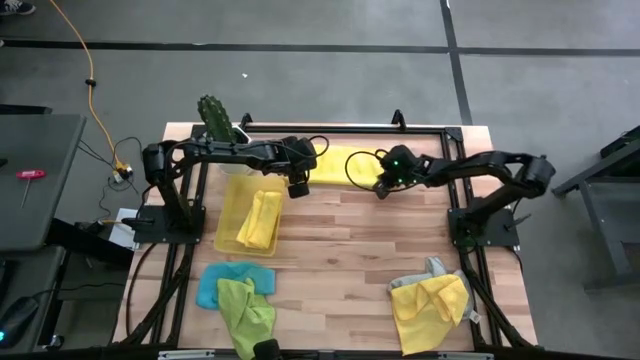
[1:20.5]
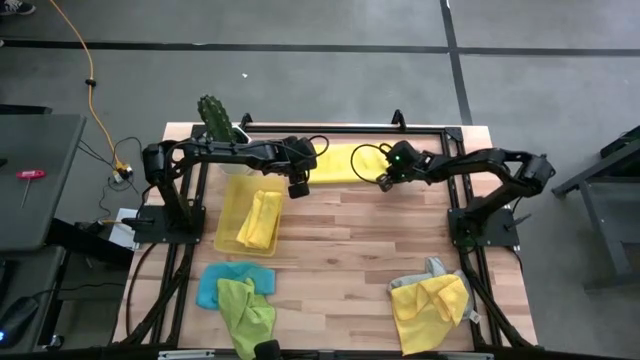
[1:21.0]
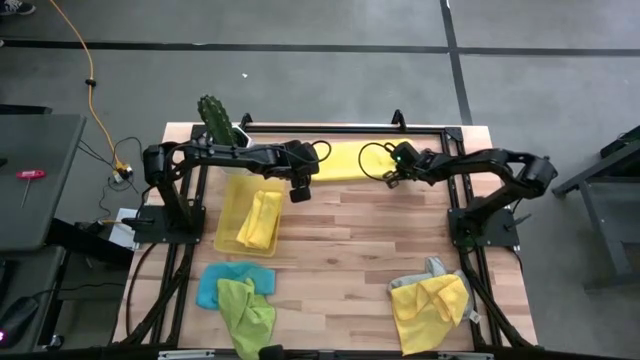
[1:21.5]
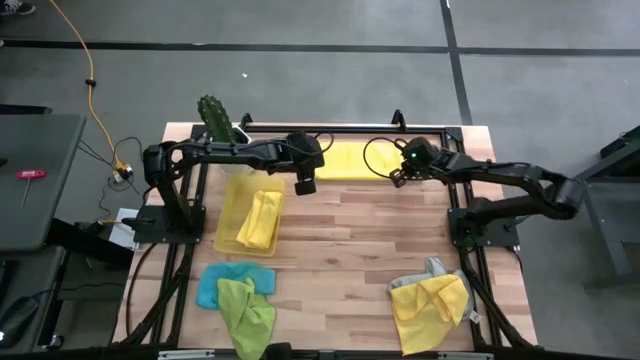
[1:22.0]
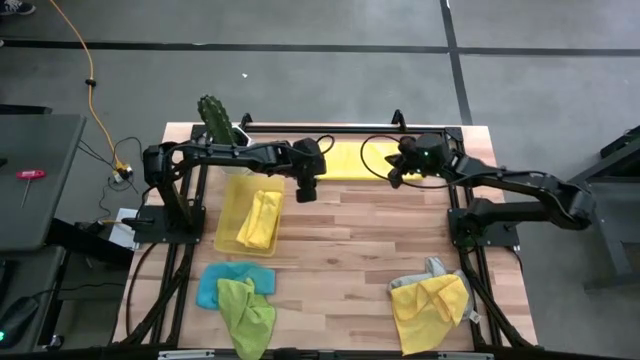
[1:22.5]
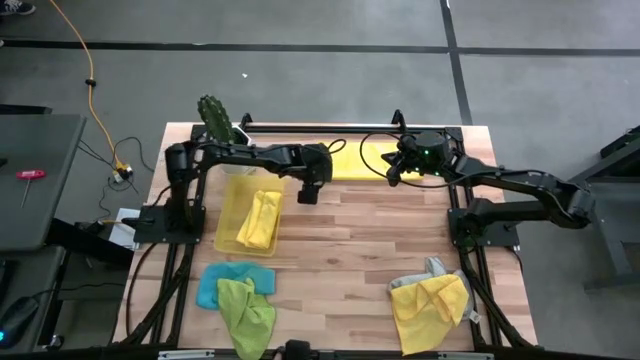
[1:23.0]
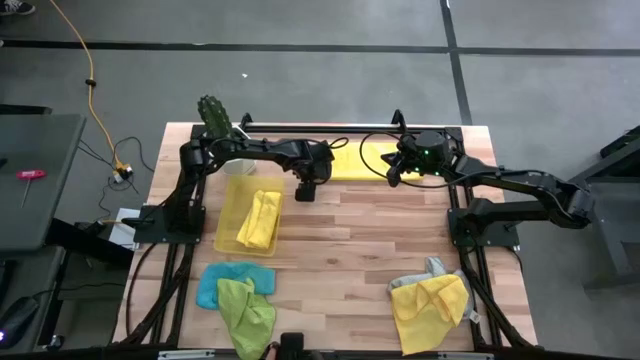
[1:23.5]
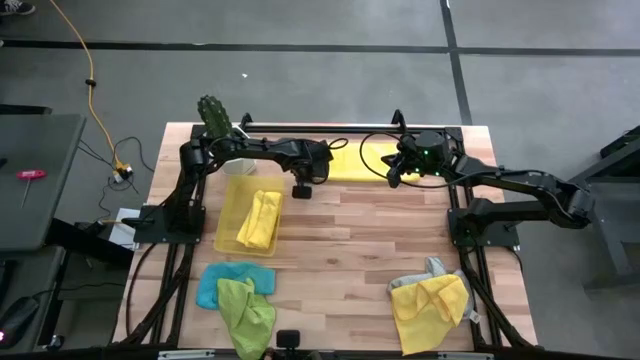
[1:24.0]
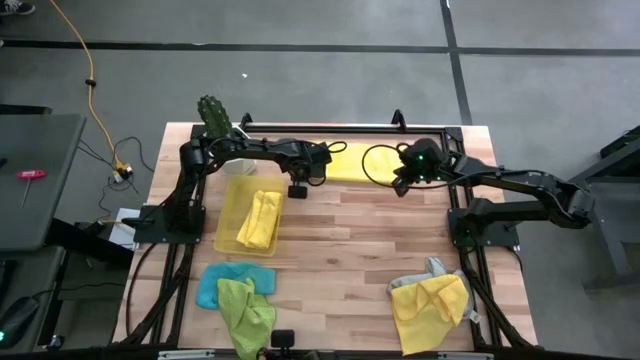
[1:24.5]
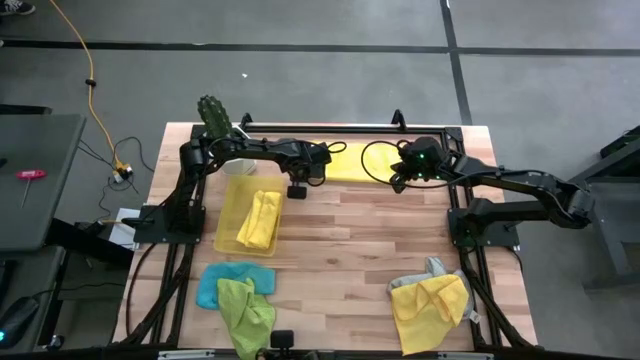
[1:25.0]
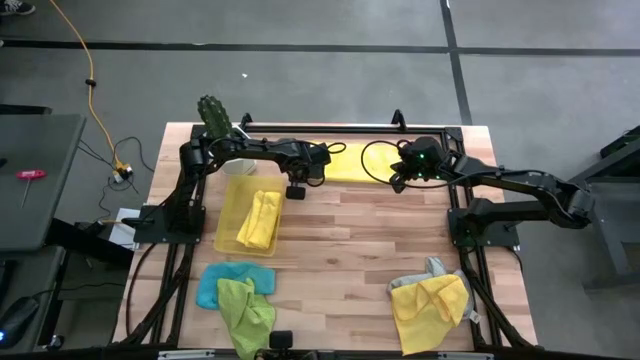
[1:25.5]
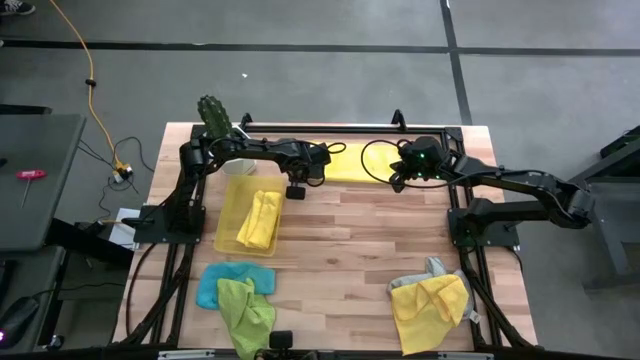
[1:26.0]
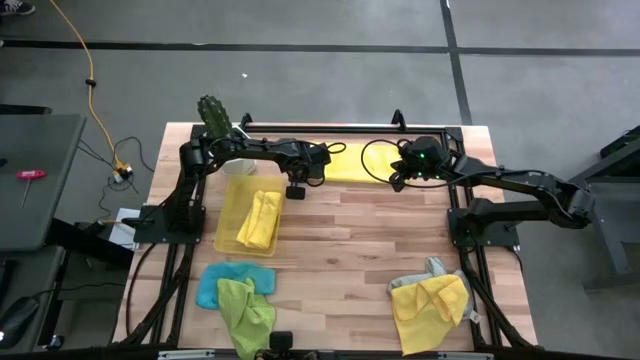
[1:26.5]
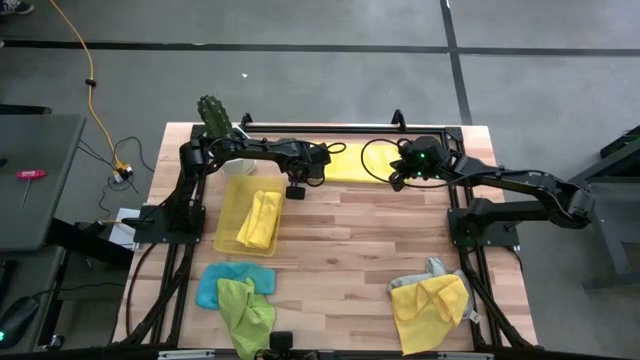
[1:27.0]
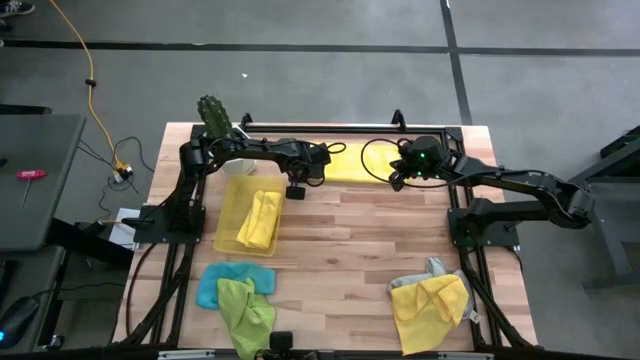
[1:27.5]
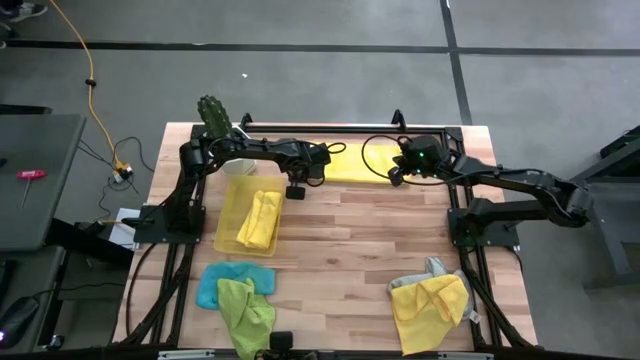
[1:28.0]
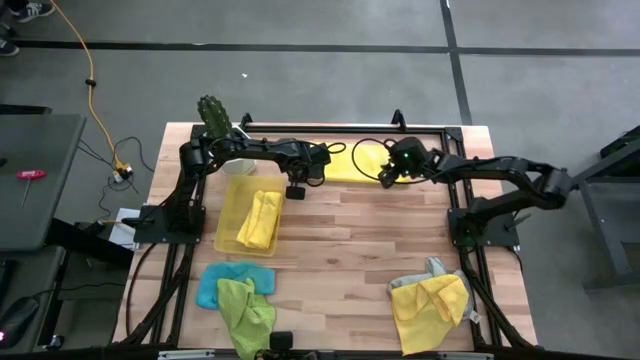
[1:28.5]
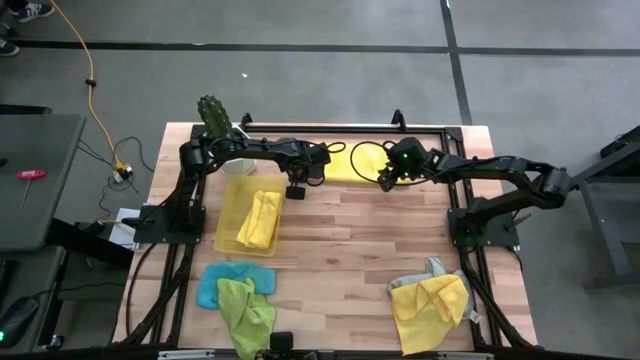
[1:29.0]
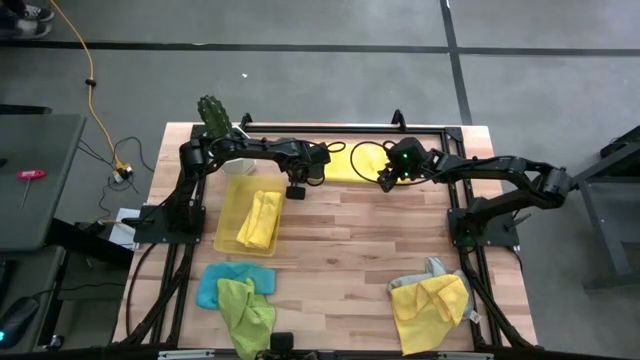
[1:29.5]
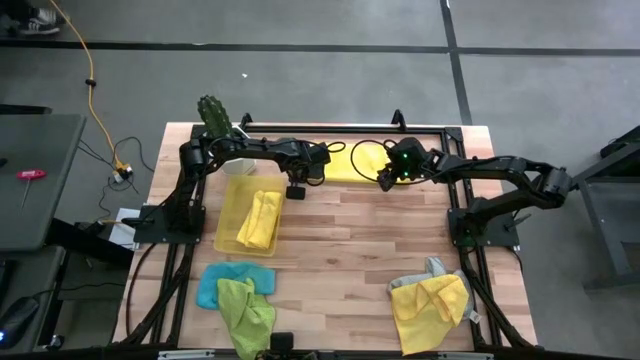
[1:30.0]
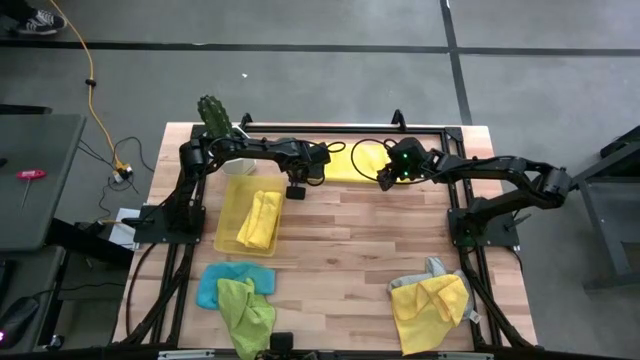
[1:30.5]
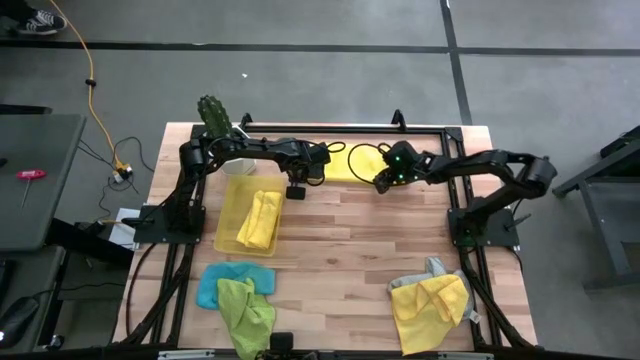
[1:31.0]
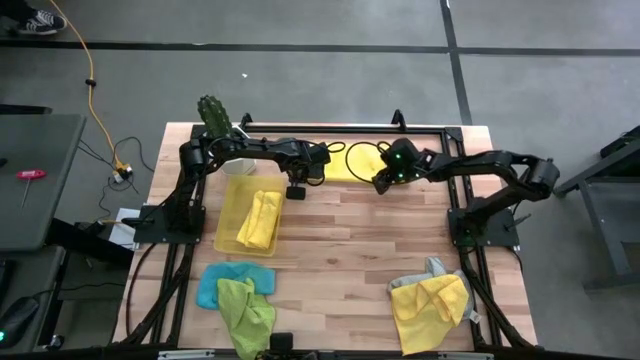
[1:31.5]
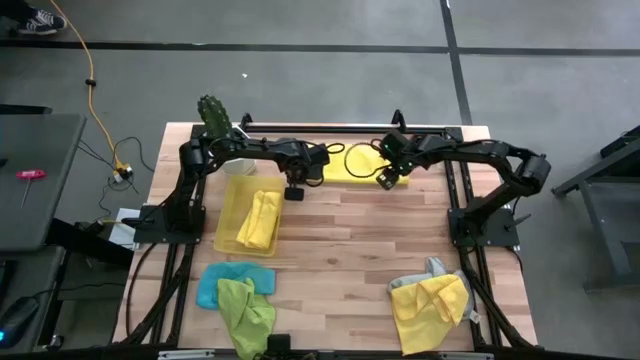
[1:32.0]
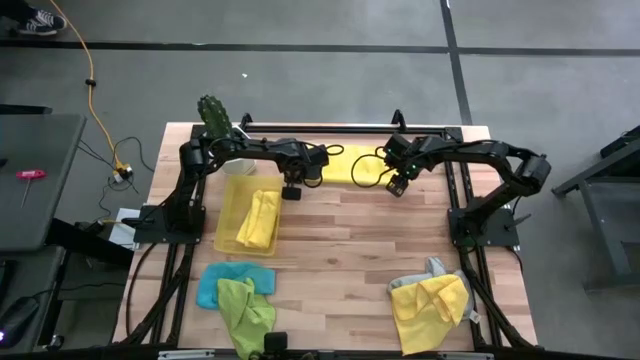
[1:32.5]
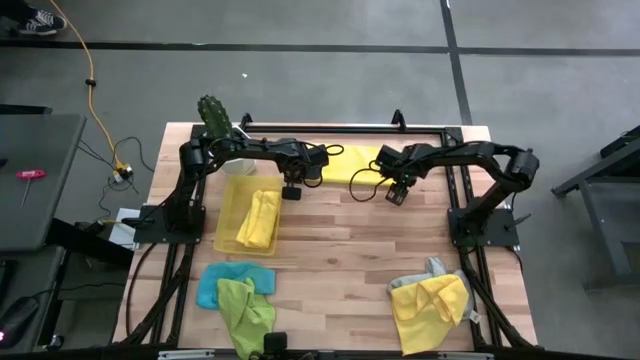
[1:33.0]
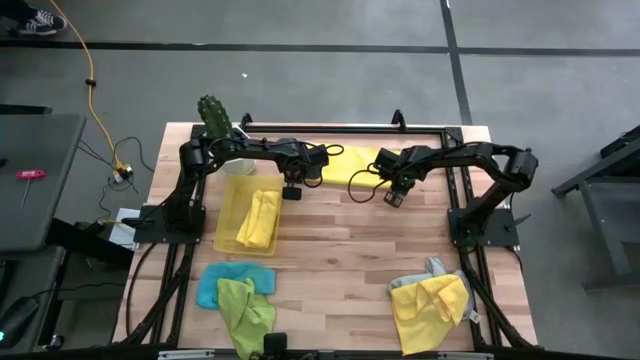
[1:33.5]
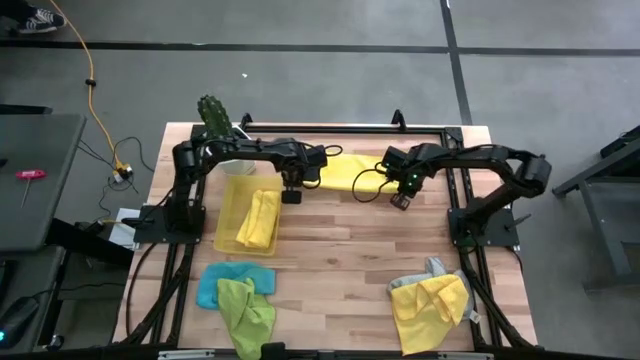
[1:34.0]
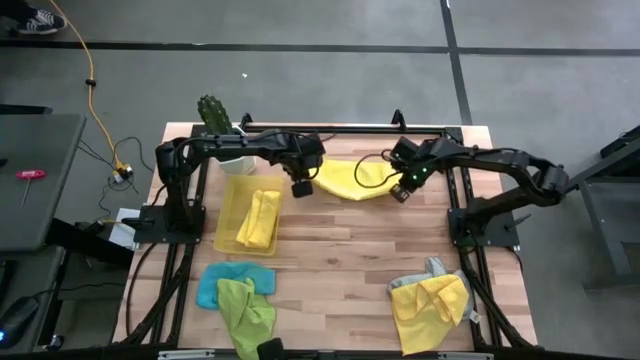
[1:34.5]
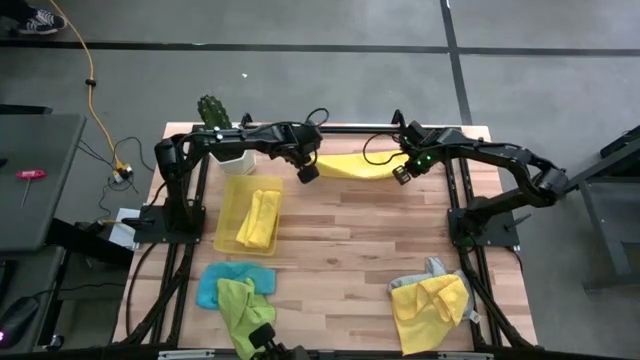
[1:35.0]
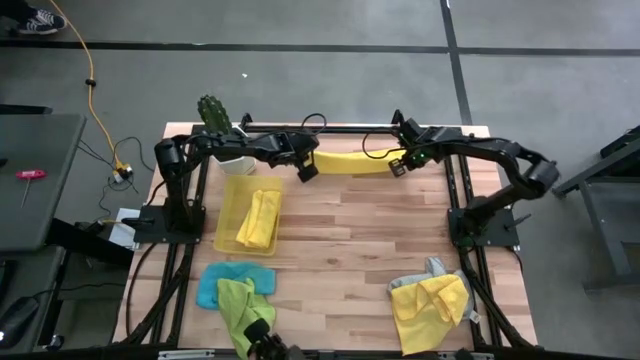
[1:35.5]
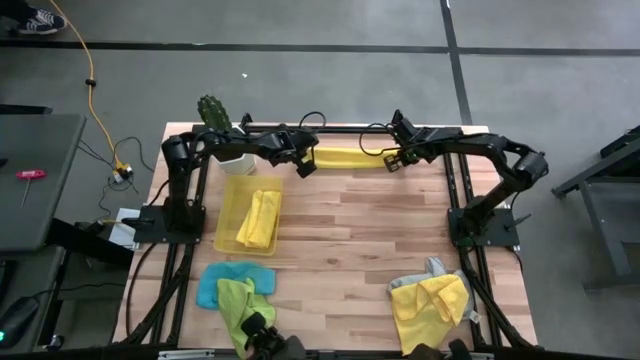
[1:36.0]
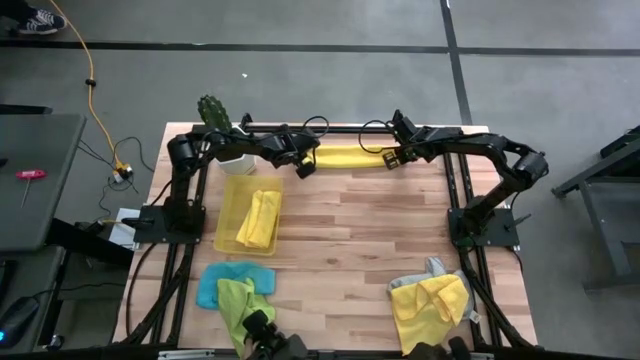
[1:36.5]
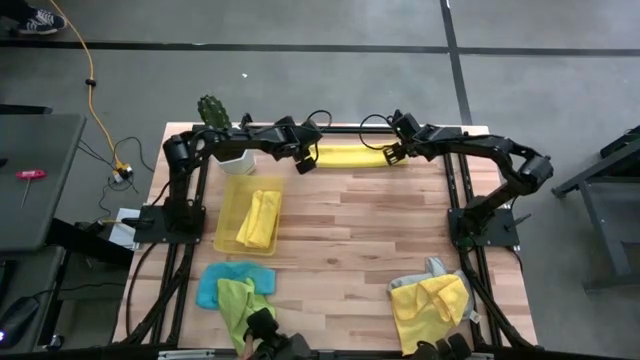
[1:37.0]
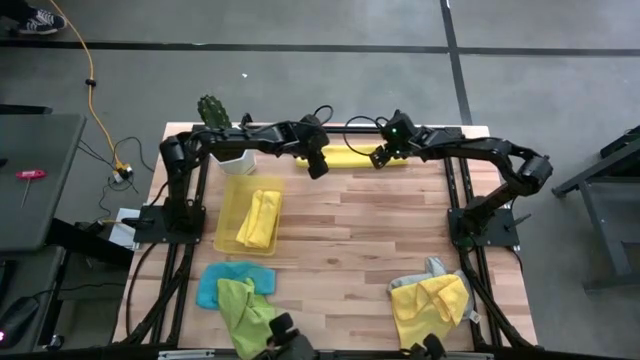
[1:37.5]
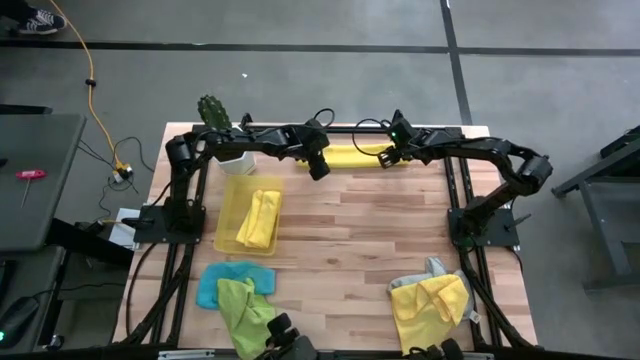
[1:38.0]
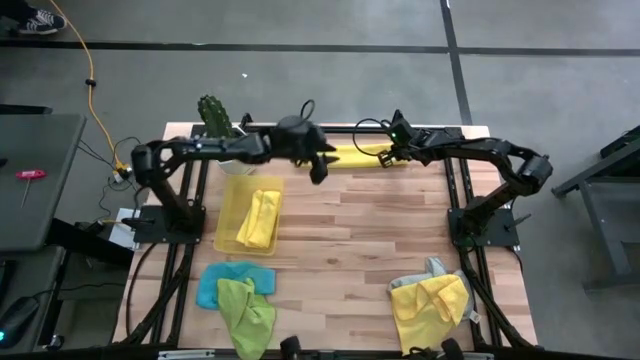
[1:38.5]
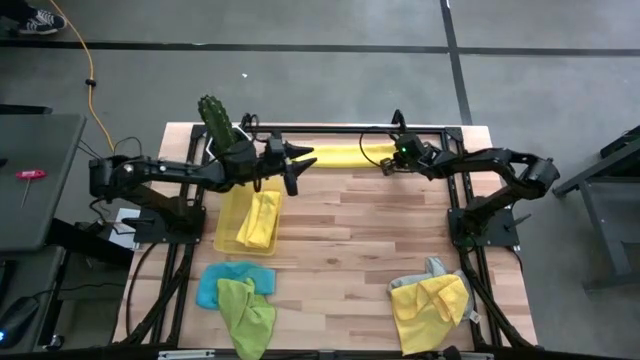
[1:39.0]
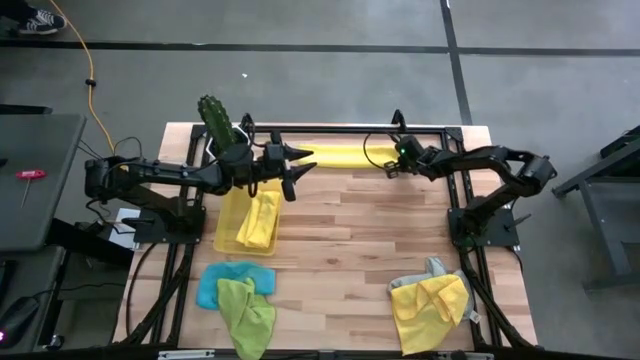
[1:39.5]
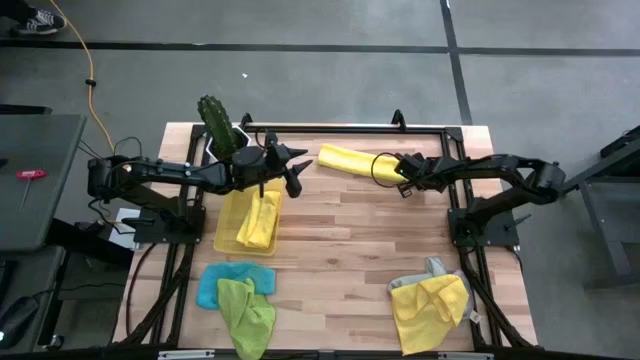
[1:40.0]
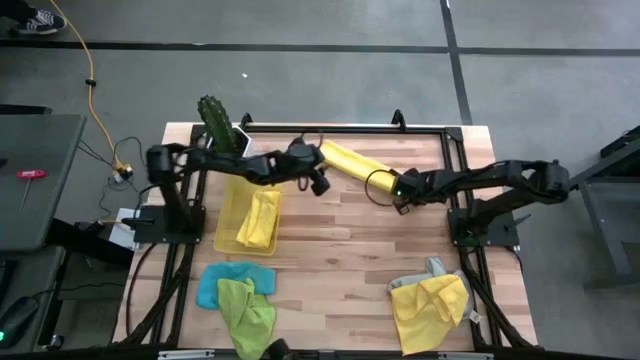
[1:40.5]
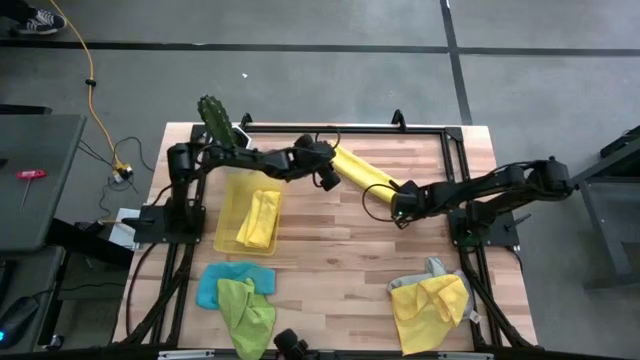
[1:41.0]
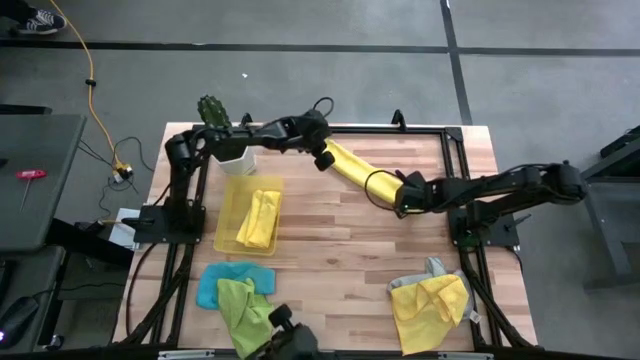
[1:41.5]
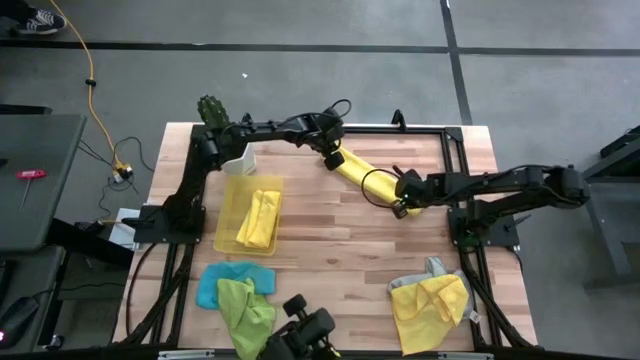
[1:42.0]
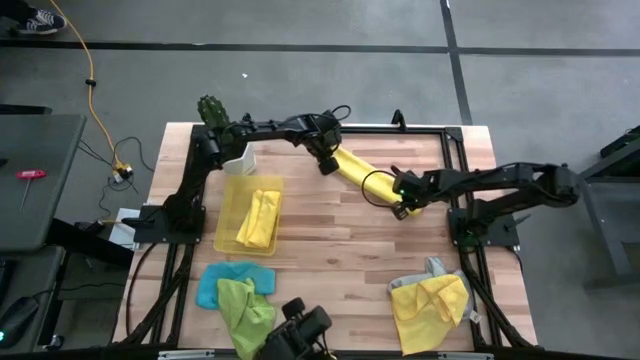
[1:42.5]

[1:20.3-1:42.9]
Task: Fold microfiber towels
Fold the top yellow microfiber towel
